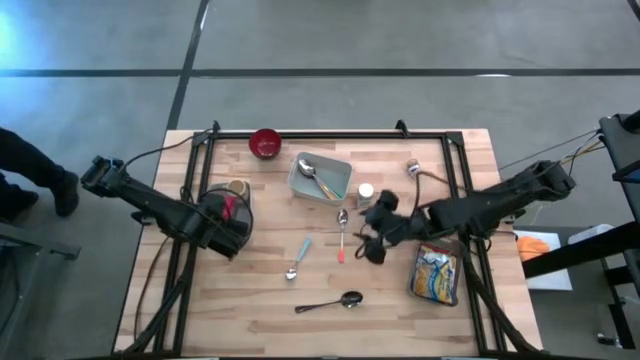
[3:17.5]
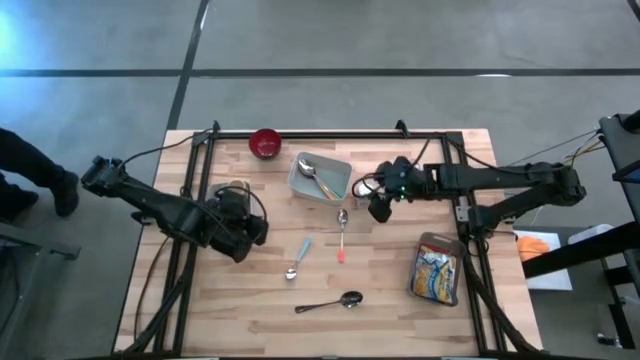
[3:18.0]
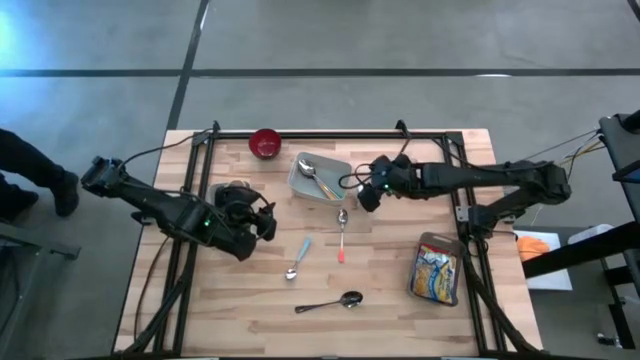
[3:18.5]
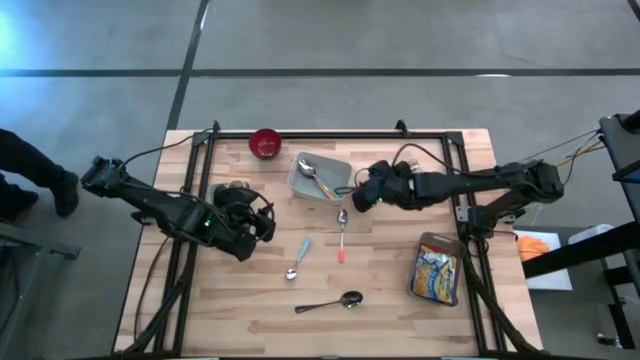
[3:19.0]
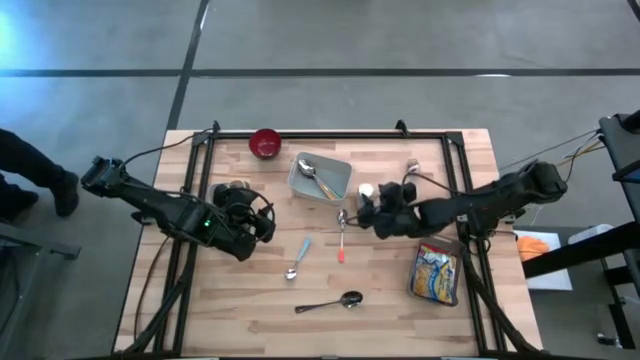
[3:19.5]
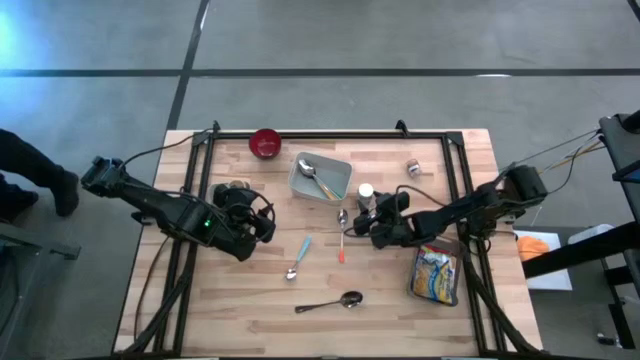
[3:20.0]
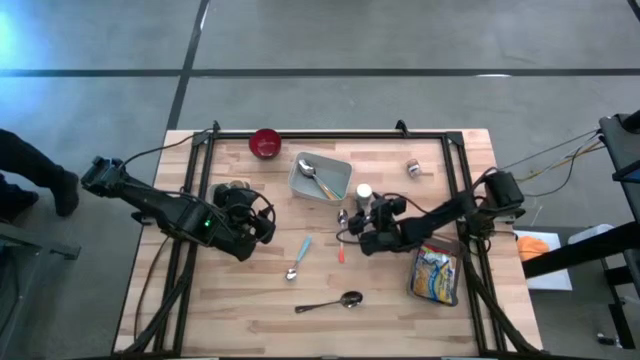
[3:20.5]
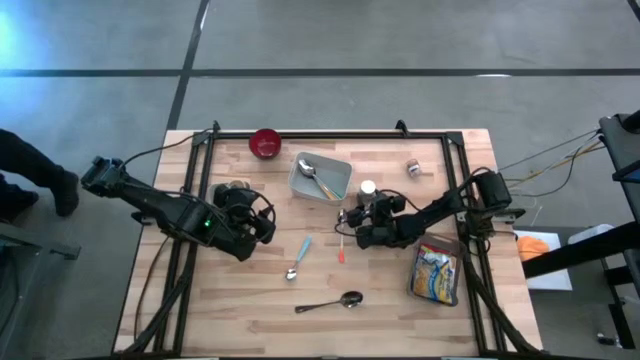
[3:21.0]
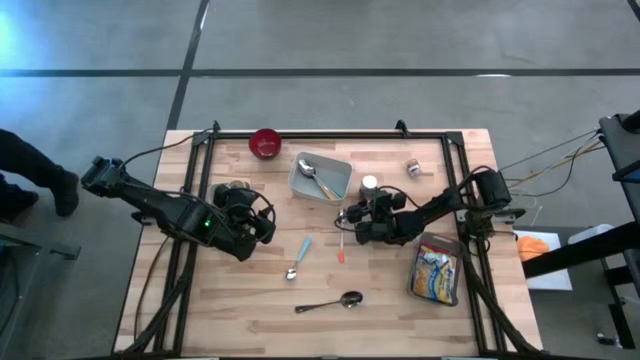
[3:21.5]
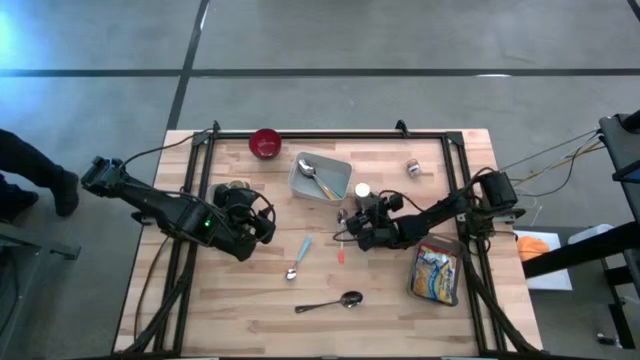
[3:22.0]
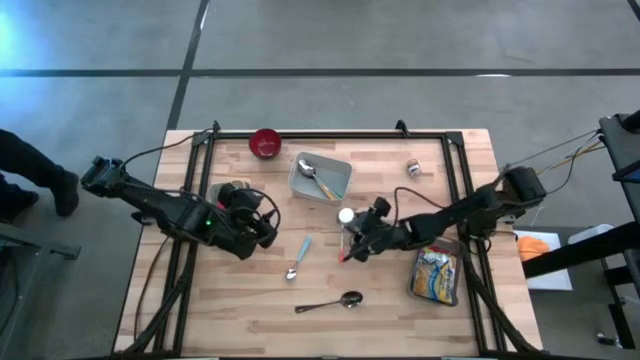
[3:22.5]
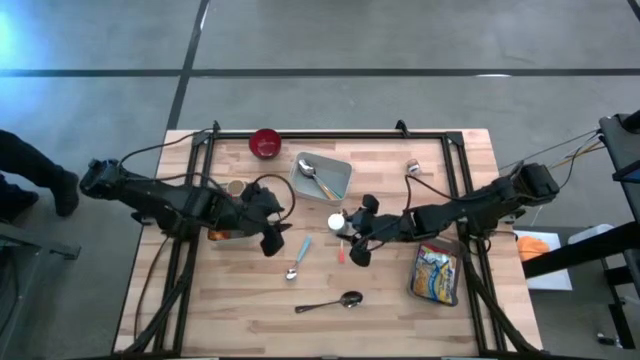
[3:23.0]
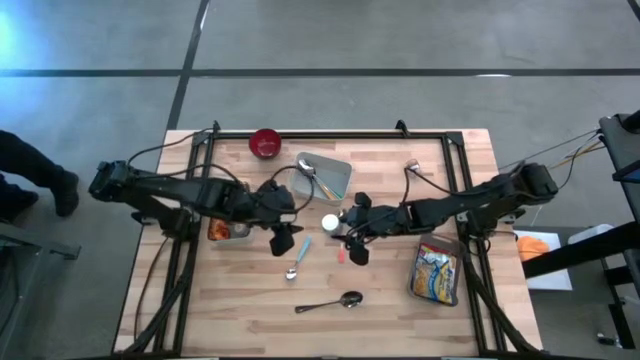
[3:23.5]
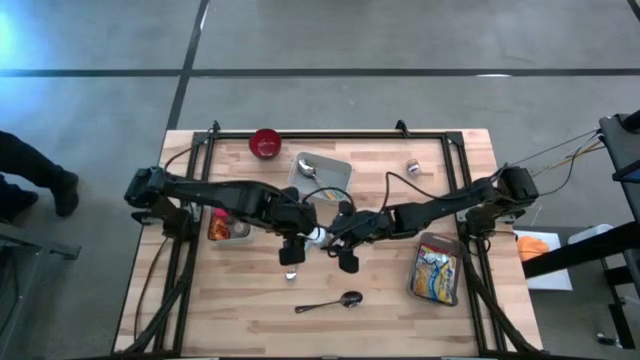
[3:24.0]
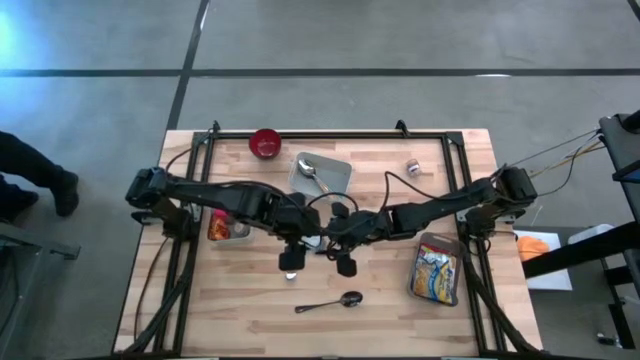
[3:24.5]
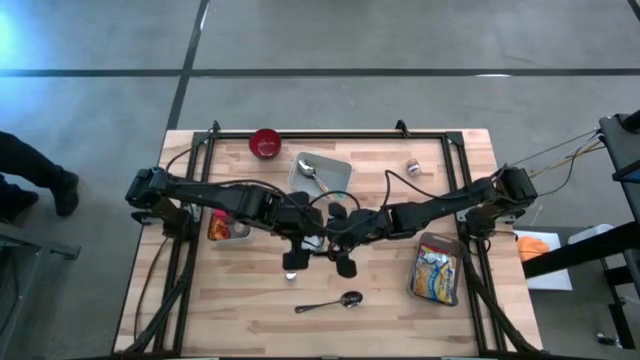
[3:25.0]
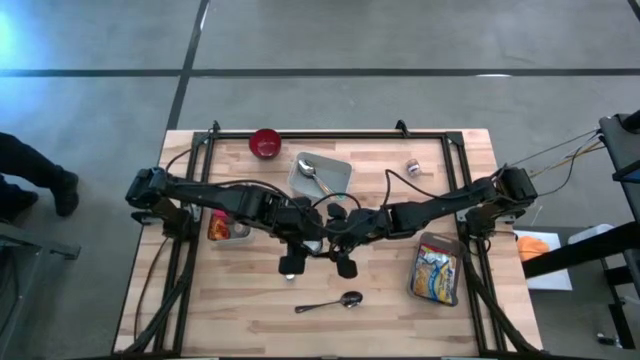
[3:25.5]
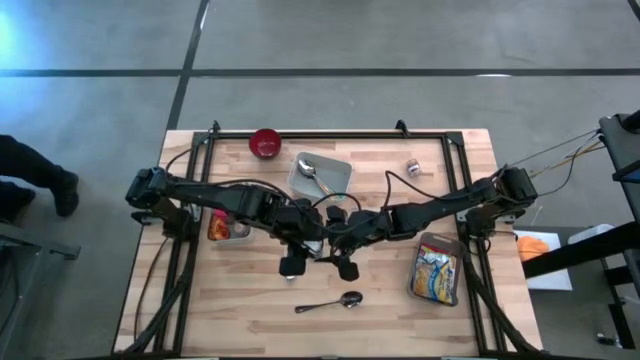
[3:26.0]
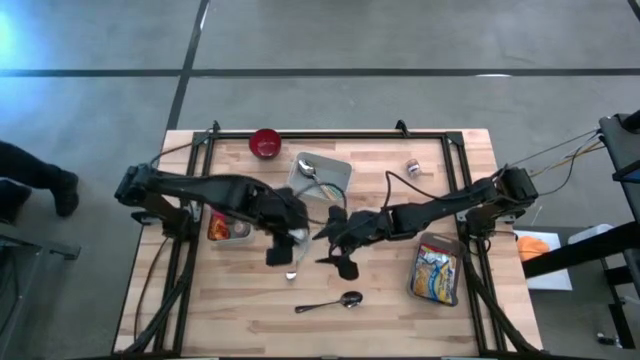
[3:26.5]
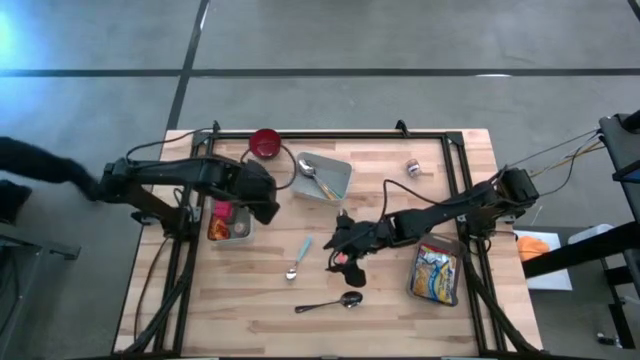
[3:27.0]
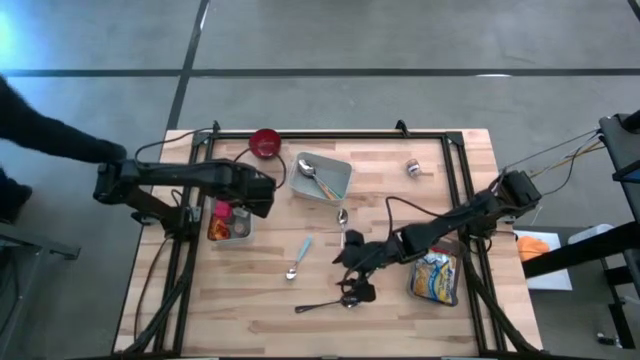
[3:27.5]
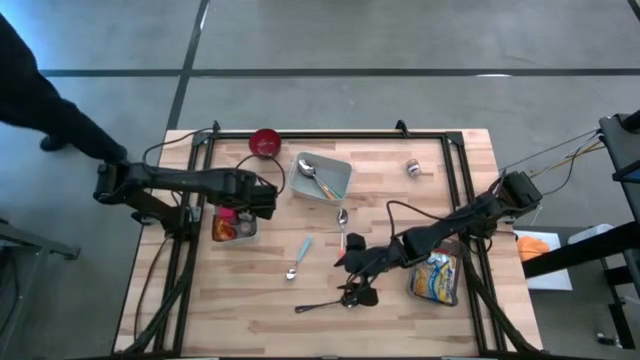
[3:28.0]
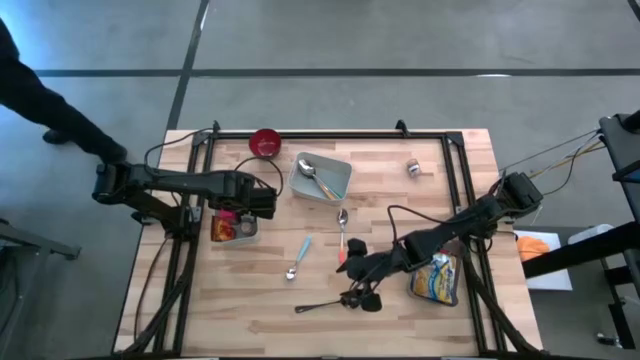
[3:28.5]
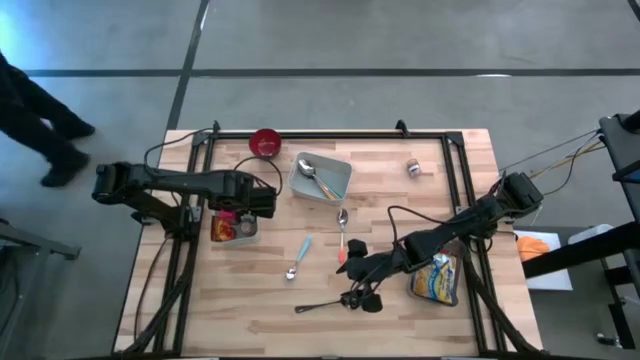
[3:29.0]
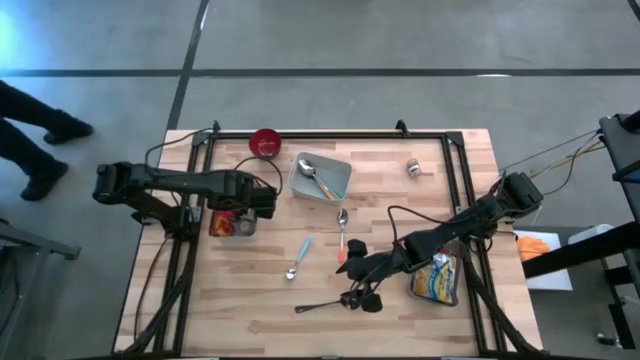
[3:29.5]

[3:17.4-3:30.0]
Put the white seasoning bottle into the left gray bin

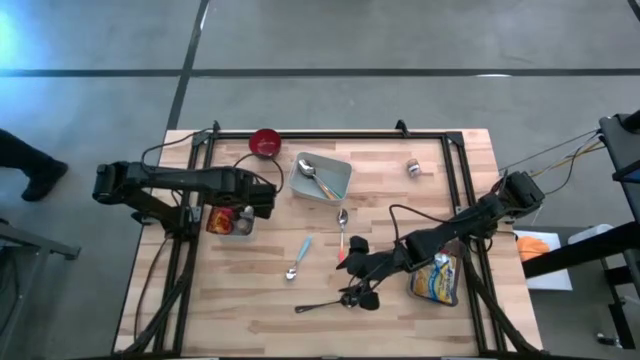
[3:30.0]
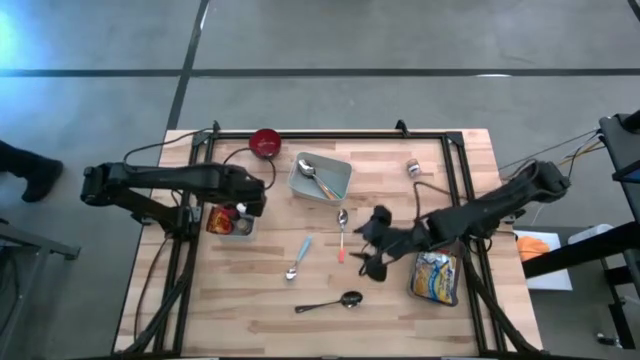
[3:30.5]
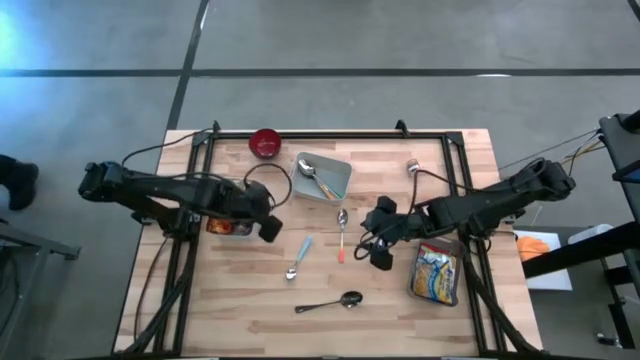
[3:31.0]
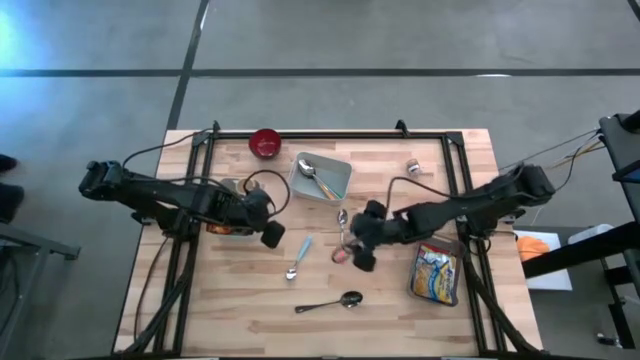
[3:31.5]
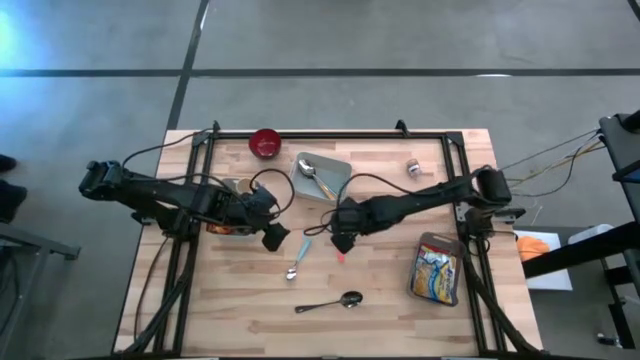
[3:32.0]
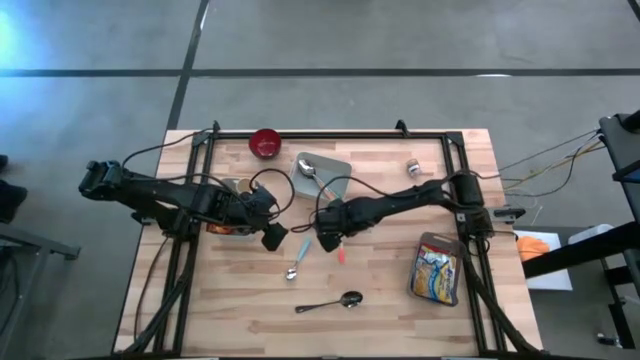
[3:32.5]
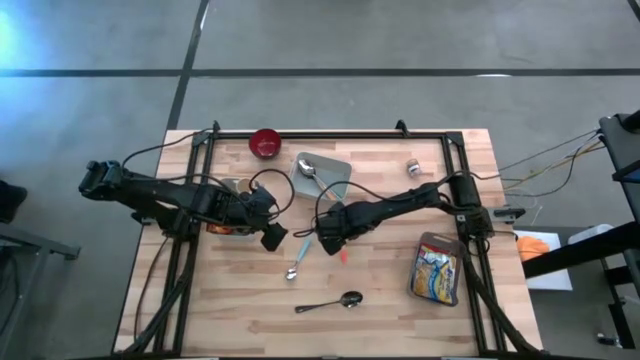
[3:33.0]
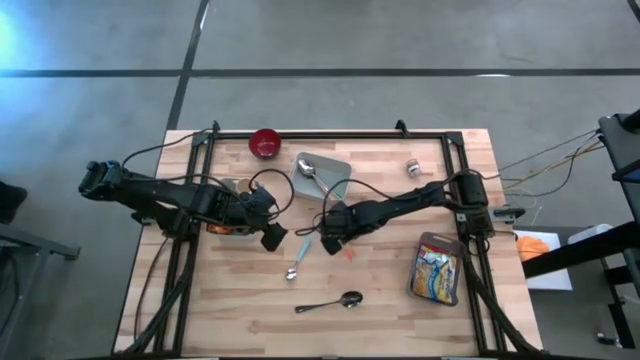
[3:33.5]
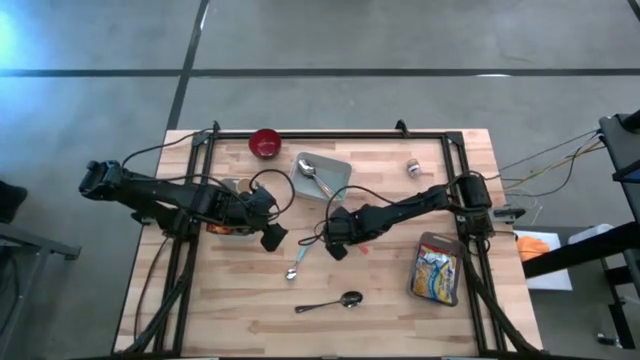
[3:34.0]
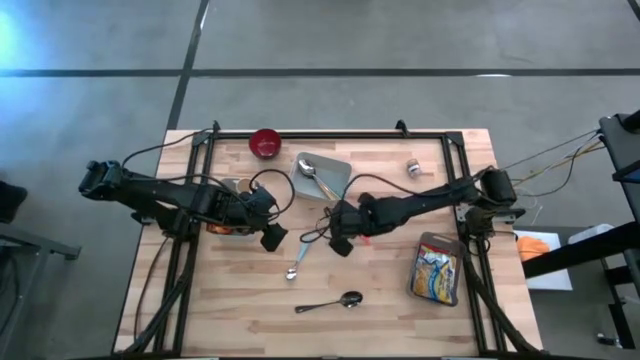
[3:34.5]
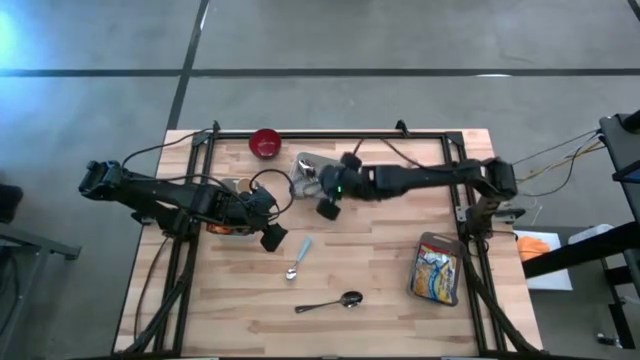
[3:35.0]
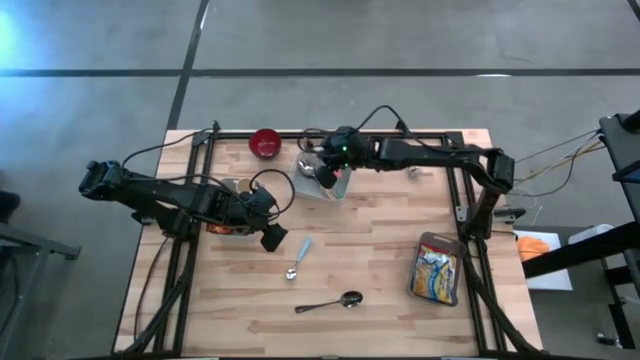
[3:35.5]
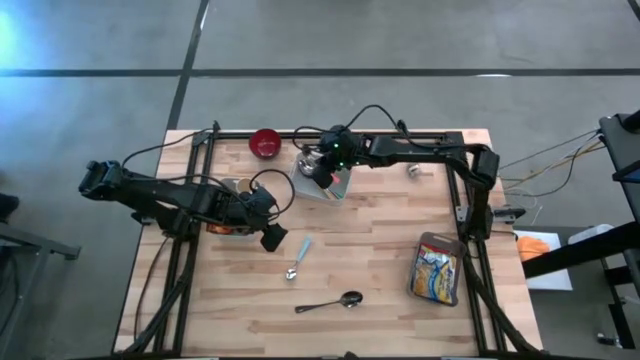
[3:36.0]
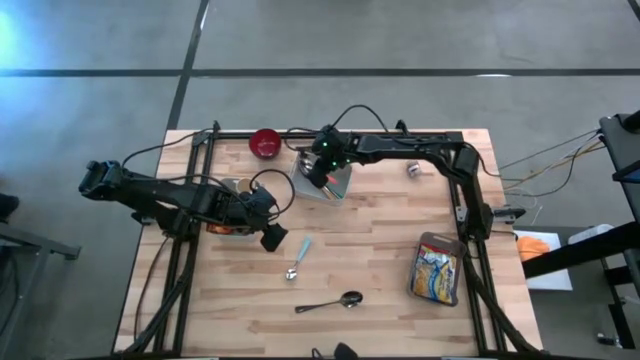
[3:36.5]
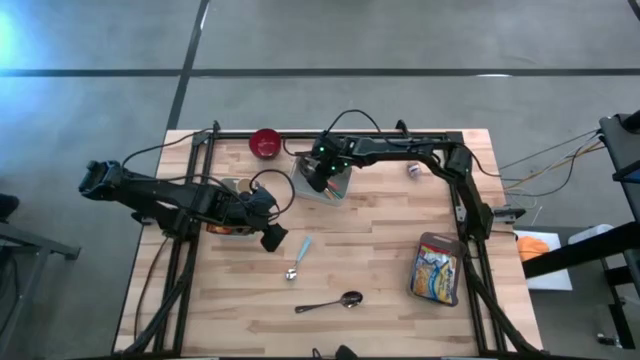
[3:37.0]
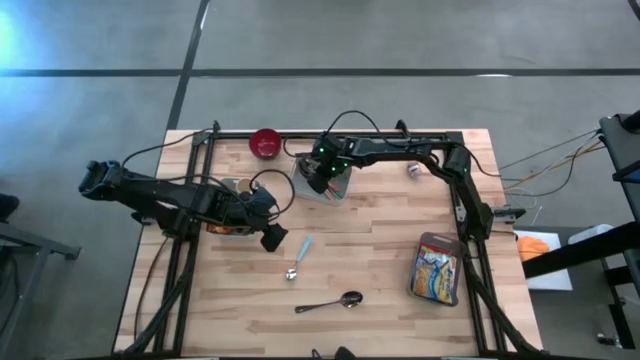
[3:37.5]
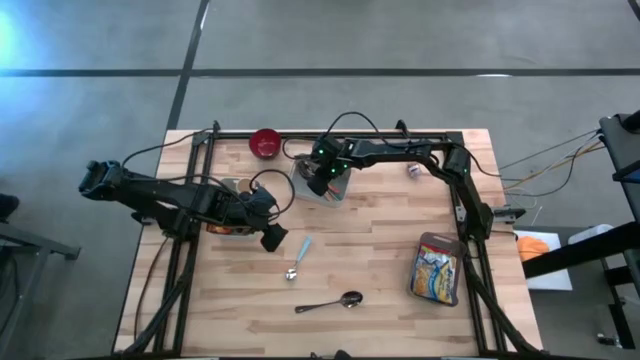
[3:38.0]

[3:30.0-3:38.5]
Put the orange spoon into the right gray bin
